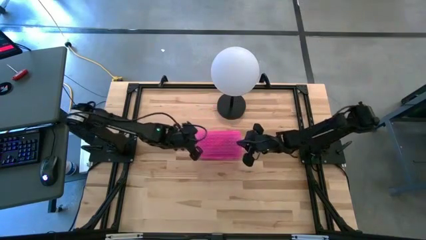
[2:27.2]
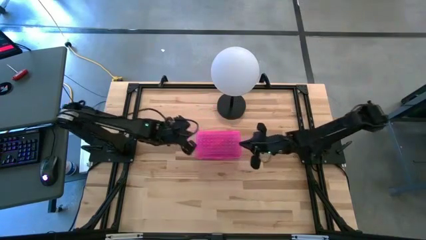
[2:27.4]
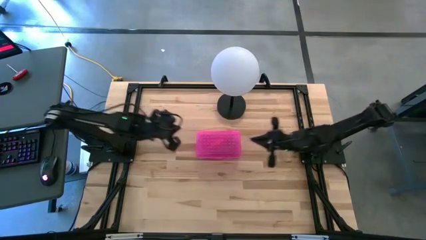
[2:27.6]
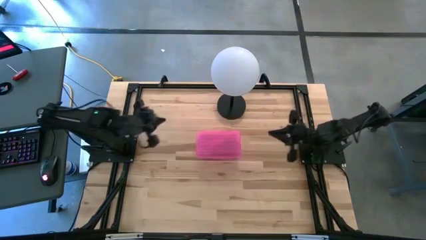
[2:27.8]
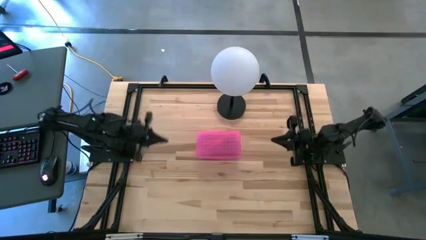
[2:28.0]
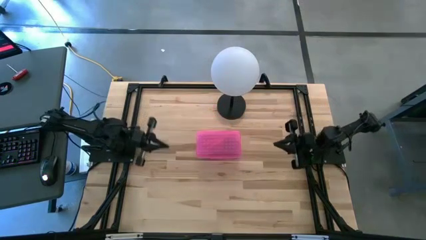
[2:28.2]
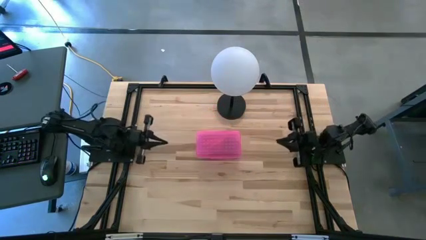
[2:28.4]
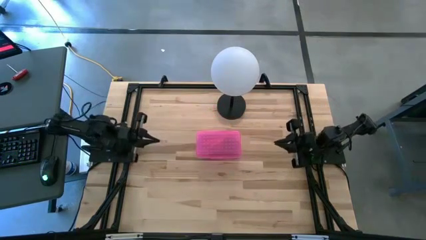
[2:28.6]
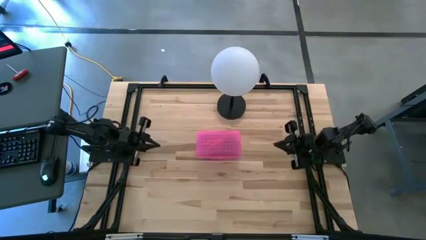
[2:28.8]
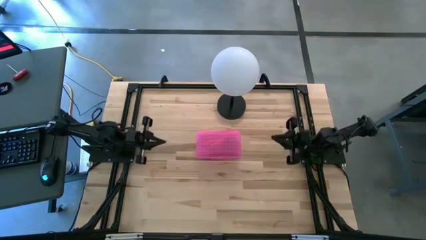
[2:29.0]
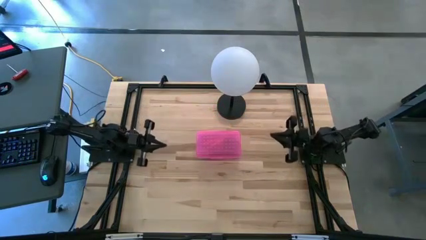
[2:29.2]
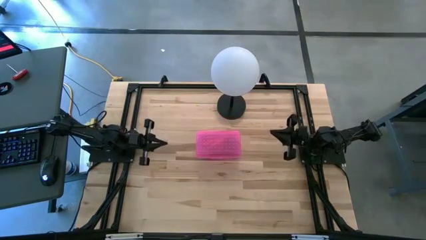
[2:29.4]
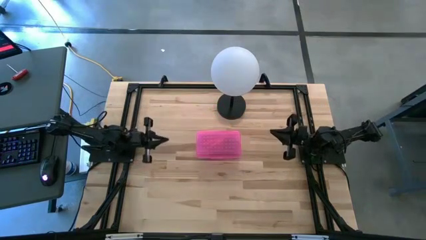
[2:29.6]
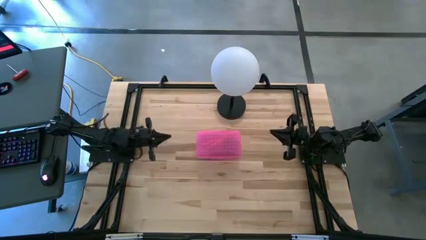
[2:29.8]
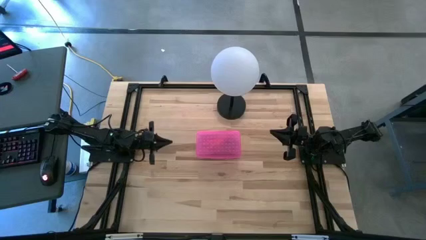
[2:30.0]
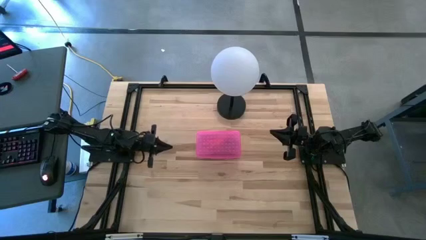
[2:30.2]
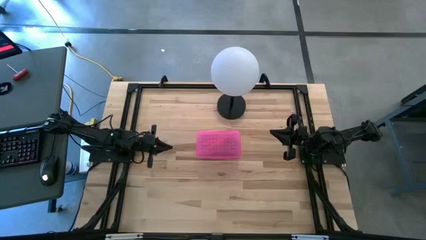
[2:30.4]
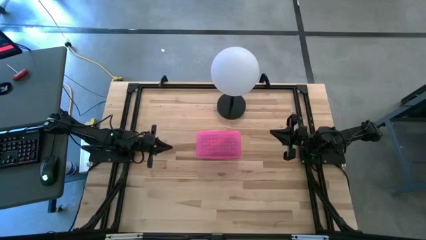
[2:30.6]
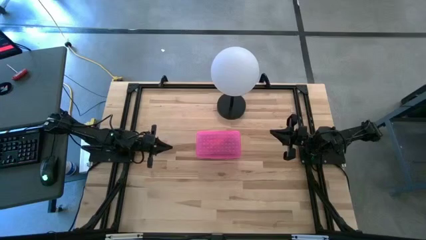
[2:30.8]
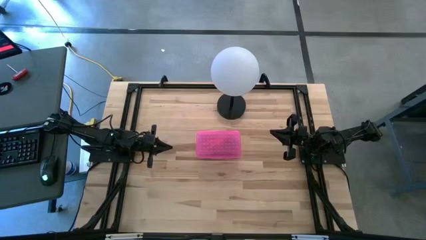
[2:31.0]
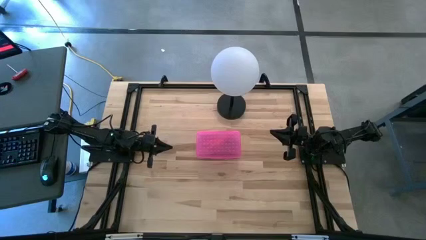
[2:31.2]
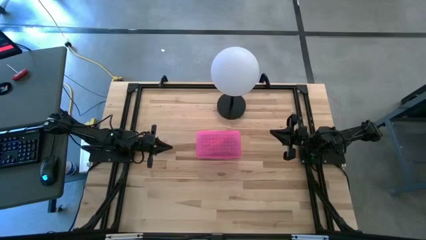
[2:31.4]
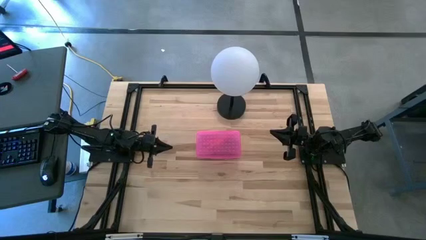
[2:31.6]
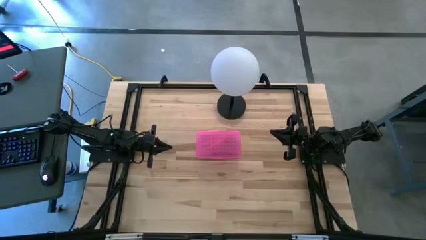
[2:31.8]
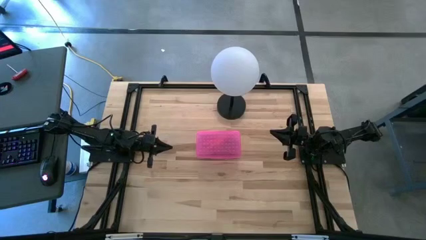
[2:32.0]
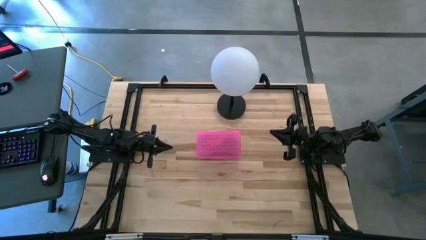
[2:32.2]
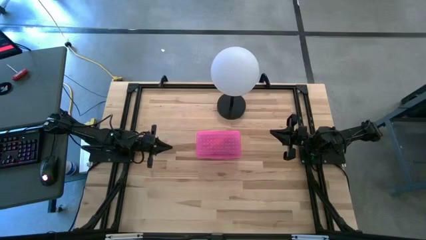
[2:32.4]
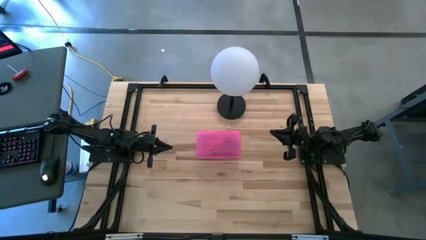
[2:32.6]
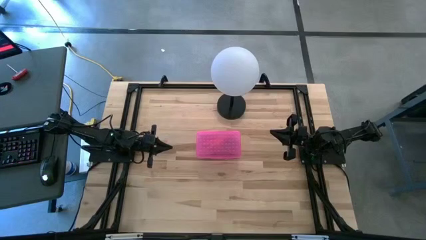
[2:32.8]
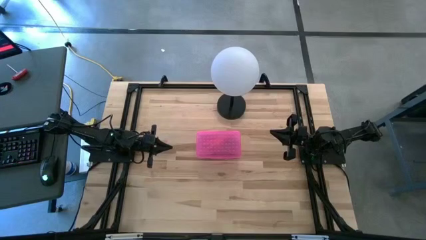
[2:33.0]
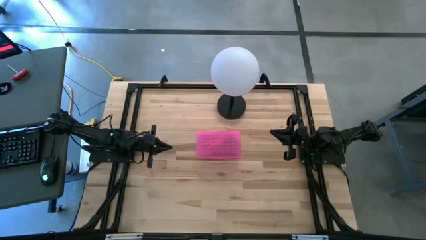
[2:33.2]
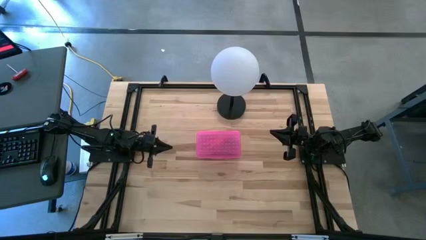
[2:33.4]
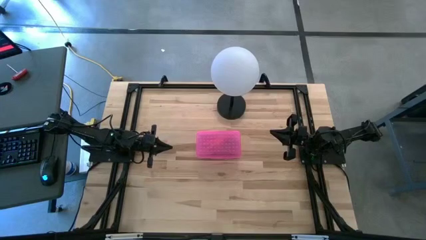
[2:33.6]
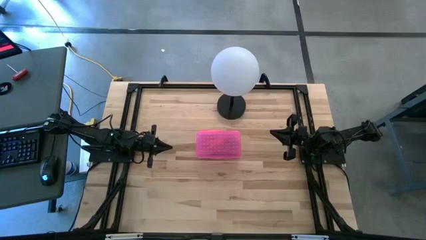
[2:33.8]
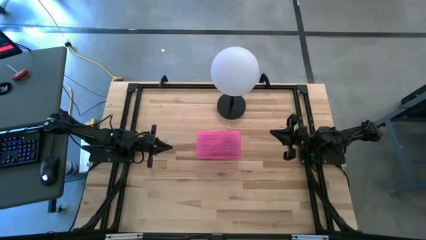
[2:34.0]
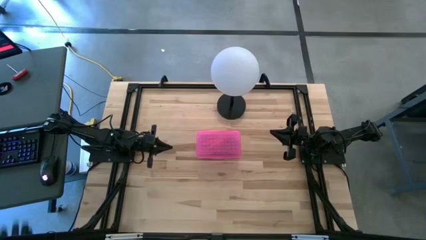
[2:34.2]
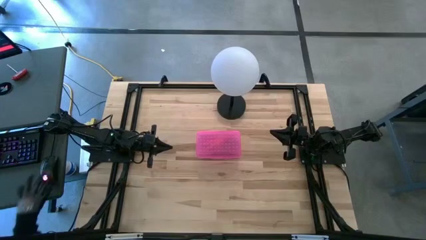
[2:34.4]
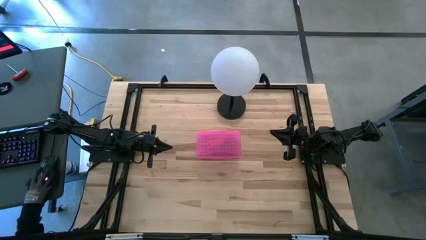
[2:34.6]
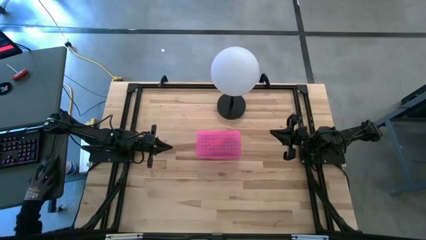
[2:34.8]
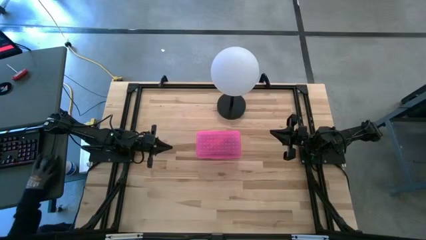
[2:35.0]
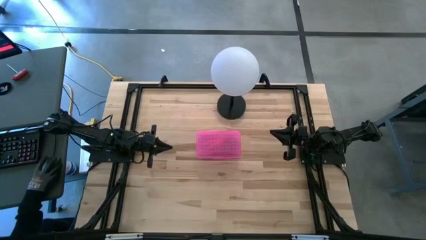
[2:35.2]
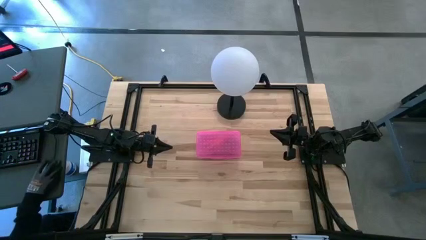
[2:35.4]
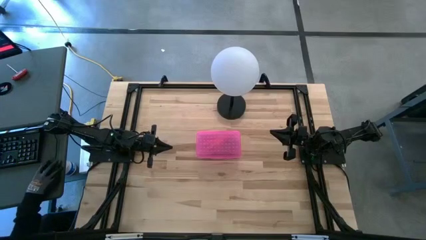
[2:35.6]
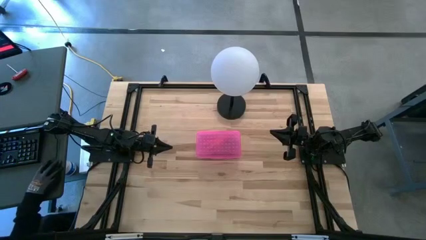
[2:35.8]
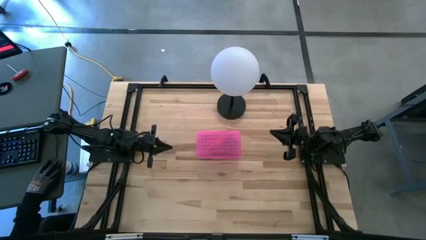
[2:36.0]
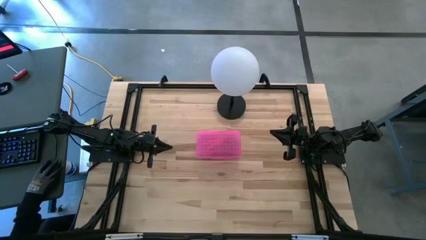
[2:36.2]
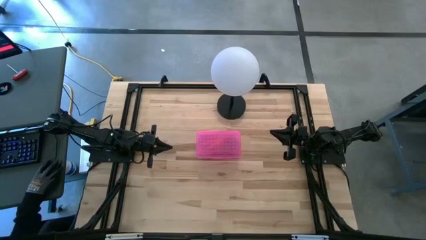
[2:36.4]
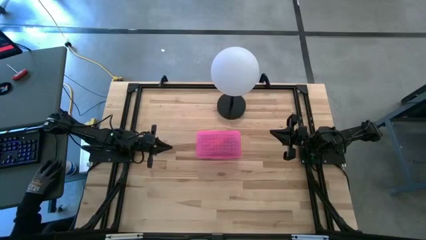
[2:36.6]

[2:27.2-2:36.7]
Task: Pick & place school supplies into a supply box
Return to Home Position

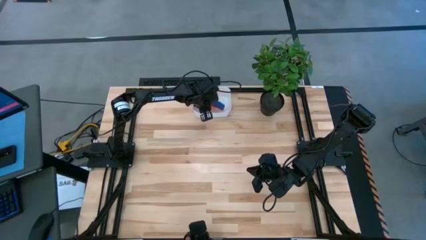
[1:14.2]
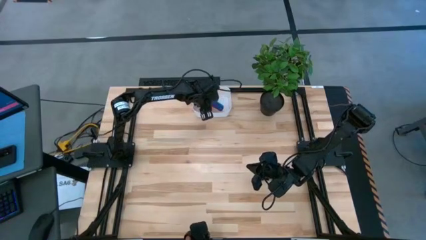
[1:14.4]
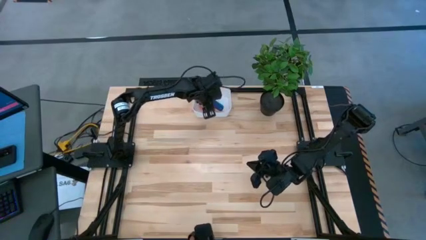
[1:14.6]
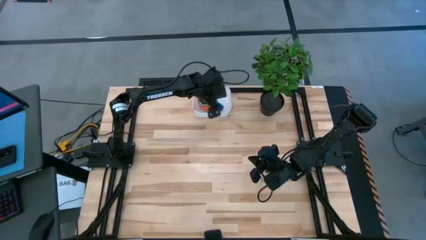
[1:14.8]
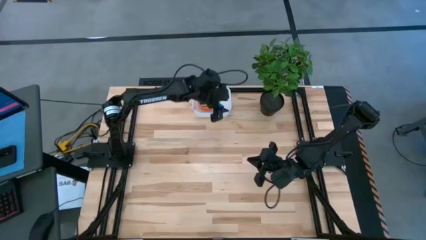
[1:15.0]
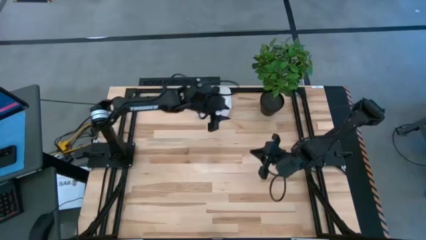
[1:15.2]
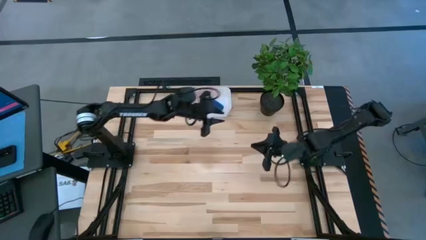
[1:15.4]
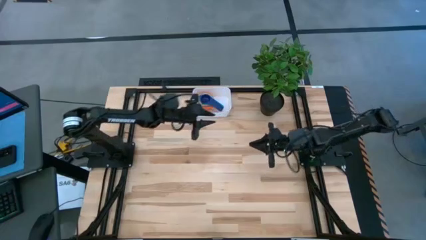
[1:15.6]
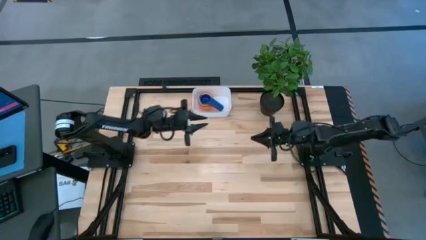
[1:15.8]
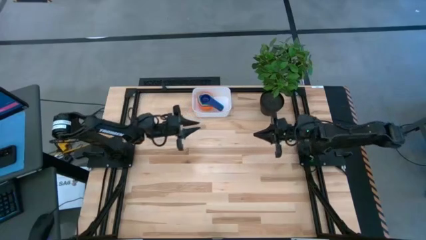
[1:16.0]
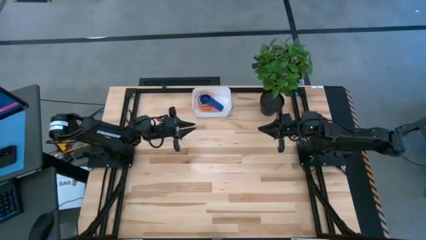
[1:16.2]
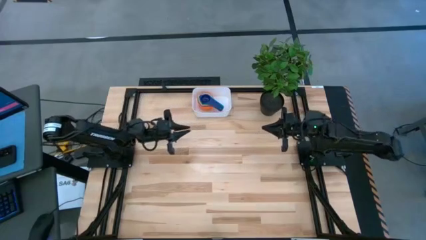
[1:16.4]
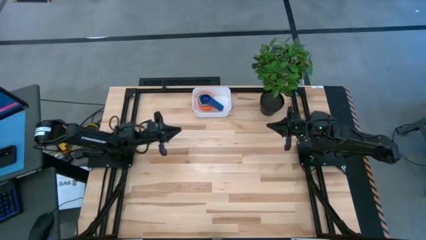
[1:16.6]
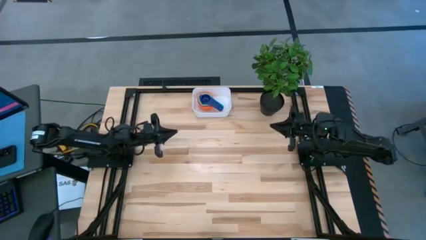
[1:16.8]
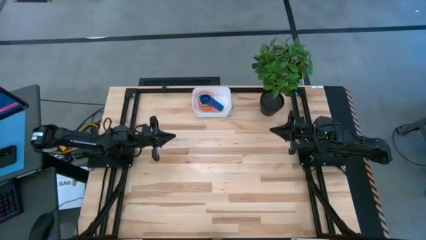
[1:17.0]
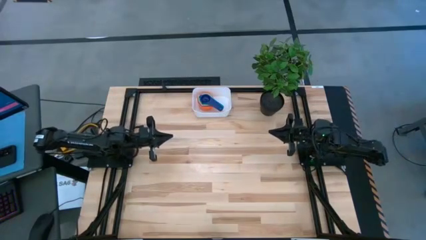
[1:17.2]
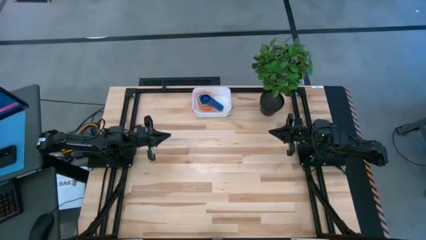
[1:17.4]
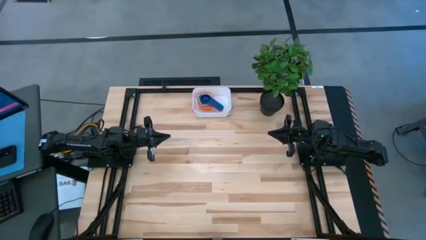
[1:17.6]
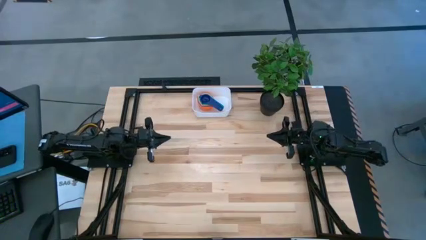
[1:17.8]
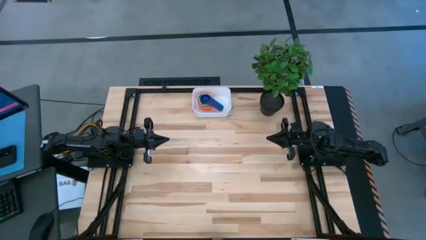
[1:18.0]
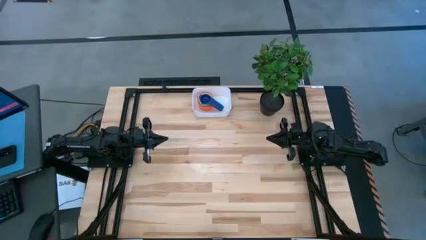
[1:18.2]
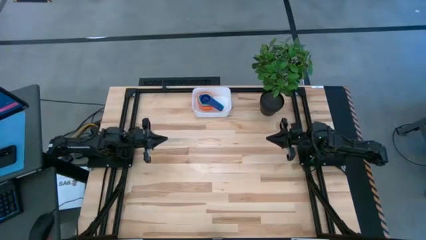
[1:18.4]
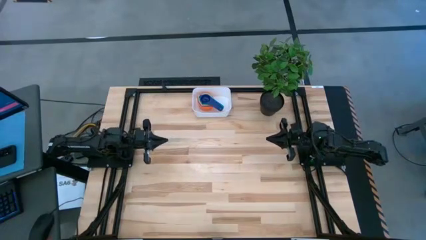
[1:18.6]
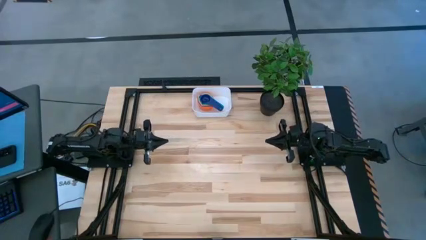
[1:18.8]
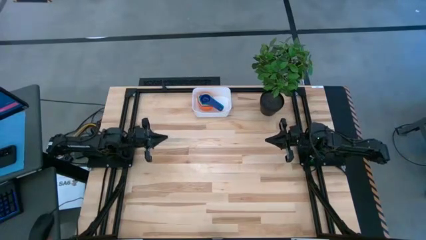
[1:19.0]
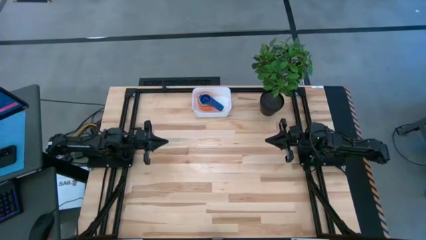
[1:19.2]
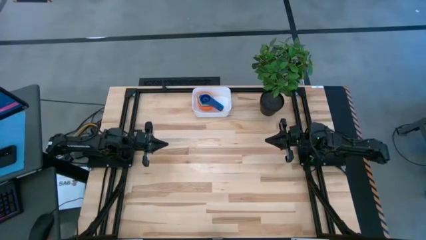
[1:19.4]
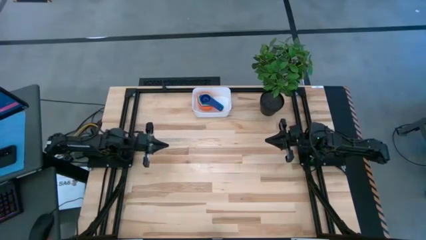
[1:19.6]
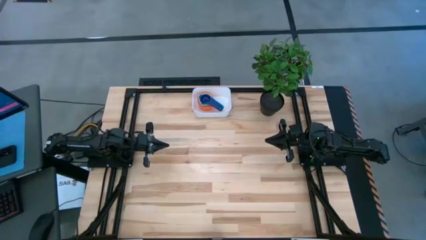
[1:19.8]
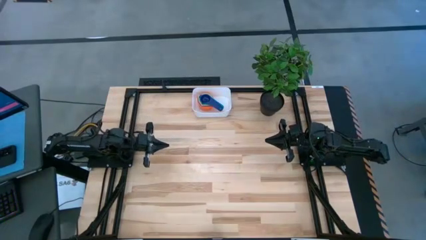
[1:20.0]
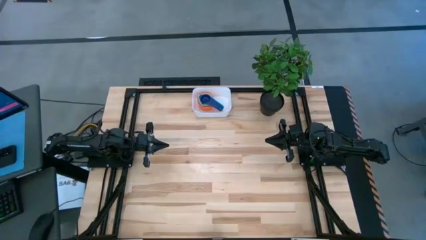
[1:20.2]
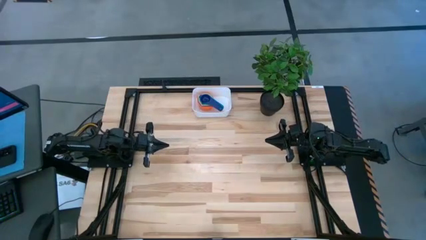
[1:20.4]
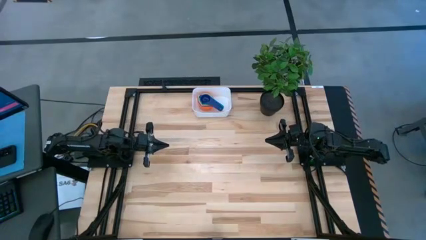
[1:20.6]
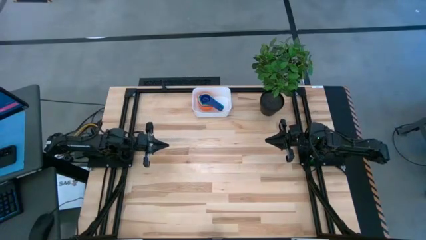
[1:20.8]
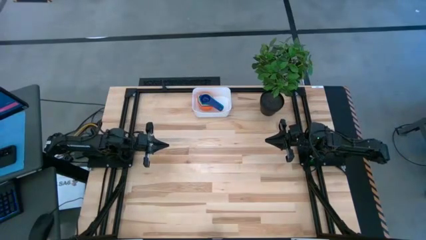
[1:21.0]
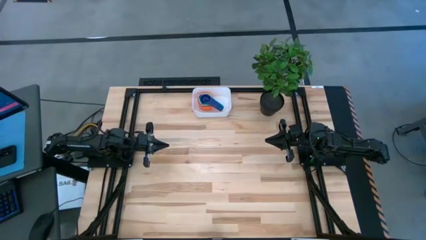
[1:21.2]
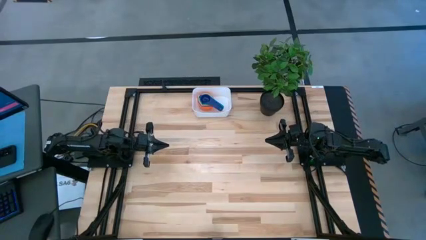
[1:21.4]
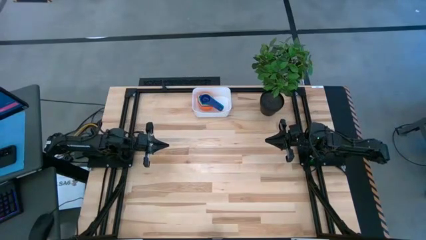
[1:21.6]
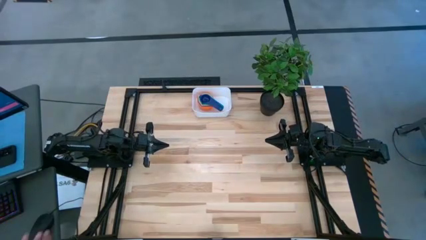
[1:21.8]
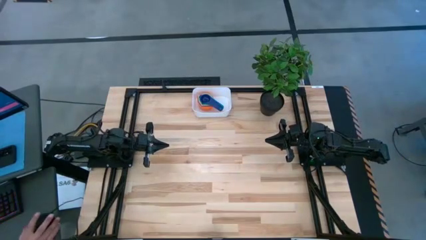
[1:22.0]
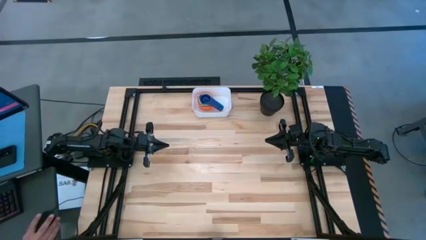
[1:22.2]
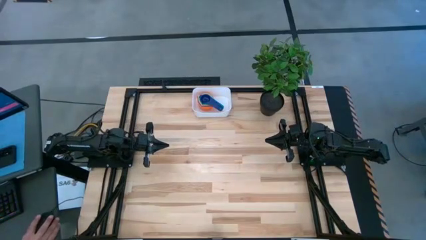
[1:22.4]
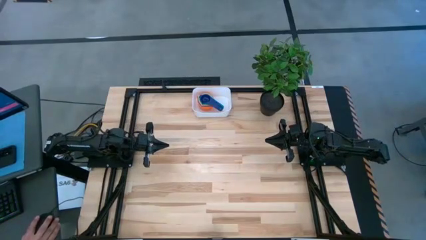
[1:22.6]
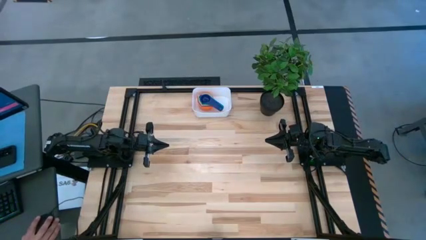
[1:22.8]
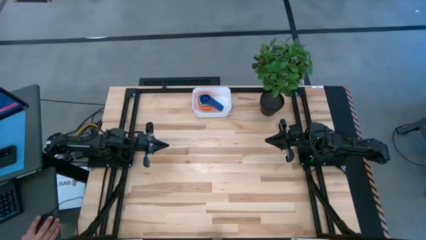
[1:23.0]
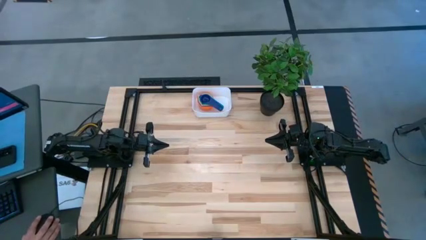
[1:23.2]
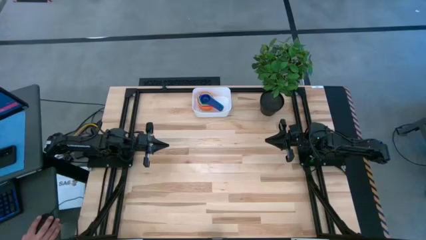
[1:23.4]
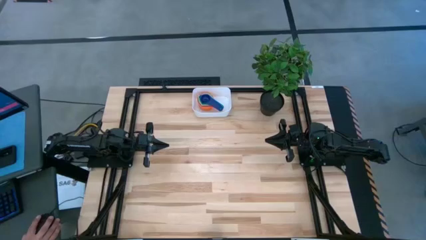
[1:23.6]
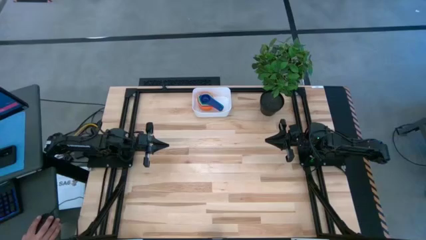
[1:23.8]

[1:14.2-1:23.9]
Task: Nest measuring cups in basket
Return to Home Position
